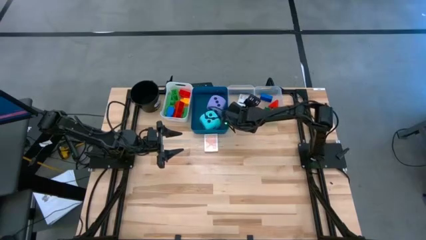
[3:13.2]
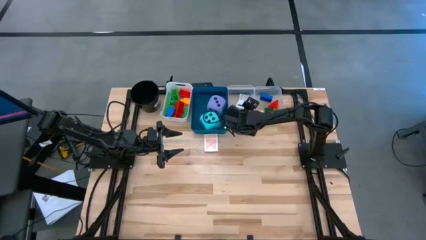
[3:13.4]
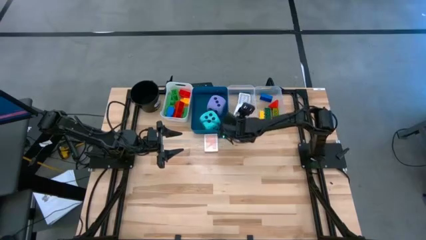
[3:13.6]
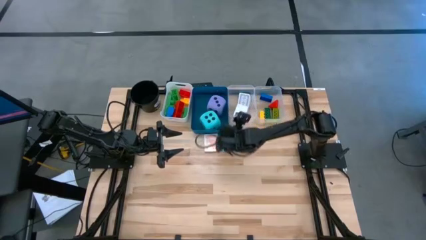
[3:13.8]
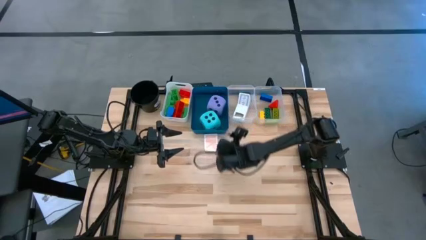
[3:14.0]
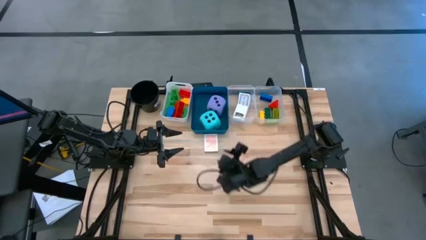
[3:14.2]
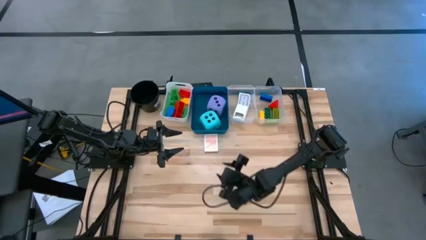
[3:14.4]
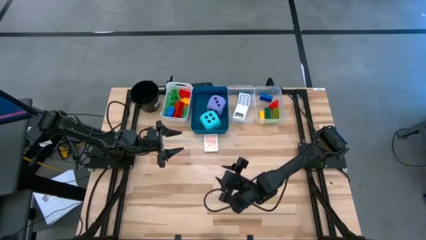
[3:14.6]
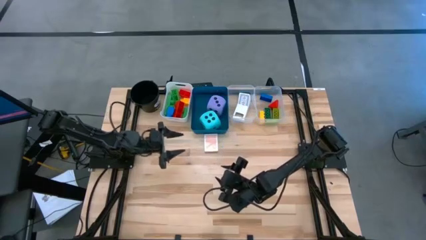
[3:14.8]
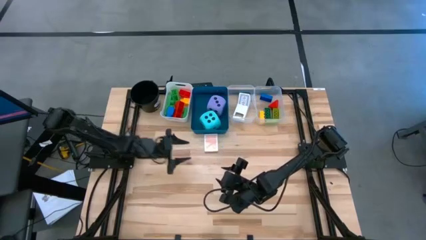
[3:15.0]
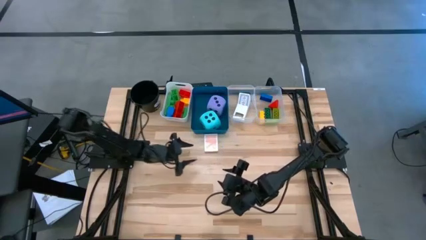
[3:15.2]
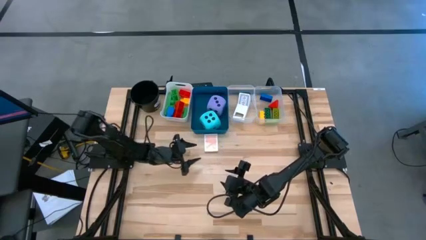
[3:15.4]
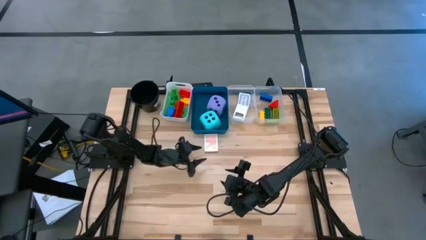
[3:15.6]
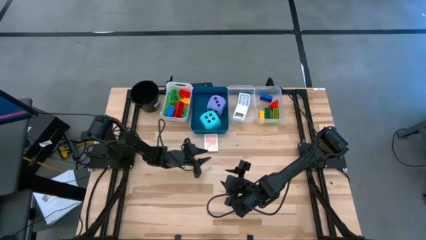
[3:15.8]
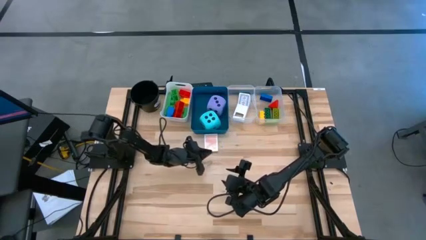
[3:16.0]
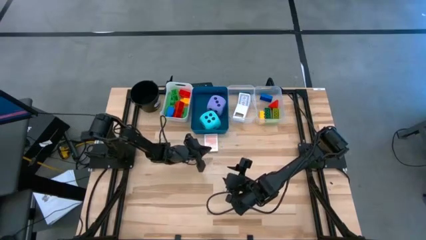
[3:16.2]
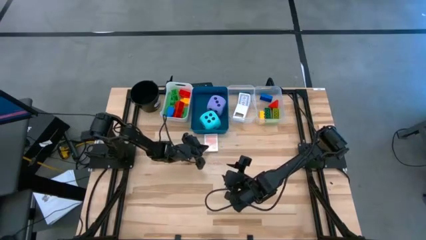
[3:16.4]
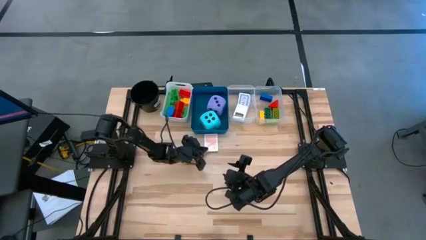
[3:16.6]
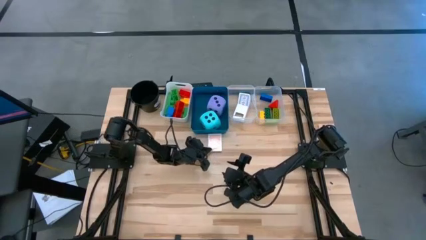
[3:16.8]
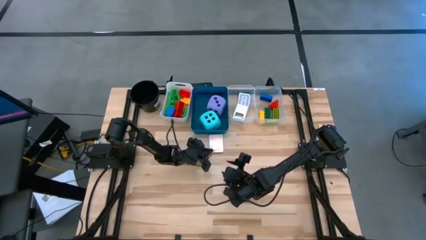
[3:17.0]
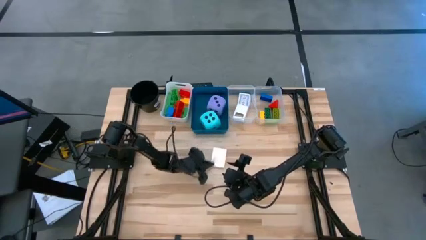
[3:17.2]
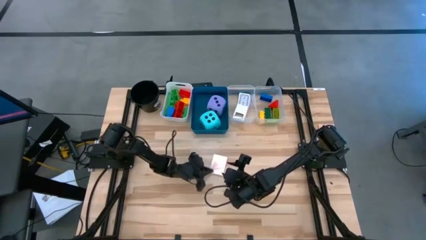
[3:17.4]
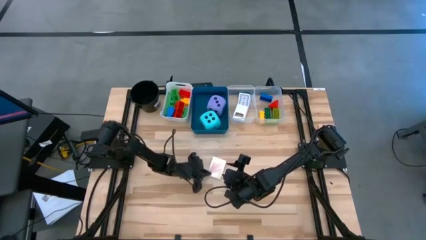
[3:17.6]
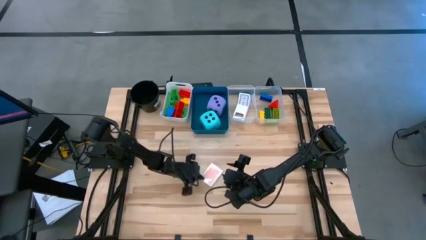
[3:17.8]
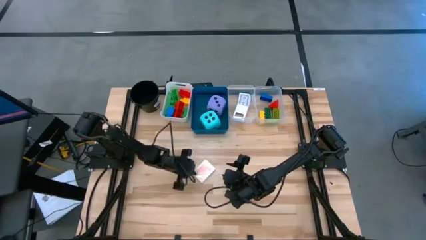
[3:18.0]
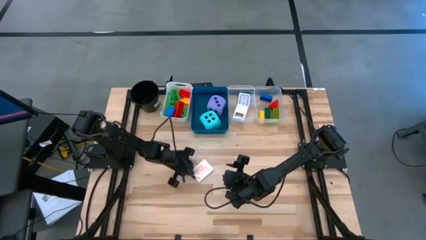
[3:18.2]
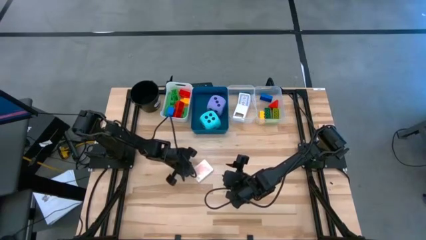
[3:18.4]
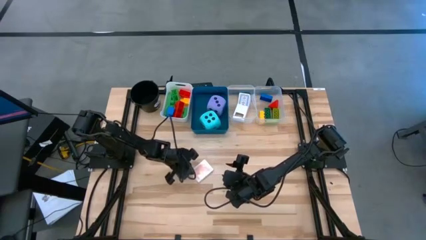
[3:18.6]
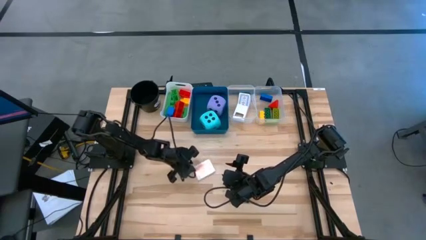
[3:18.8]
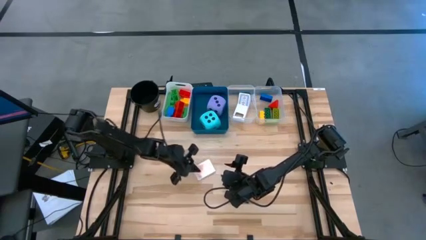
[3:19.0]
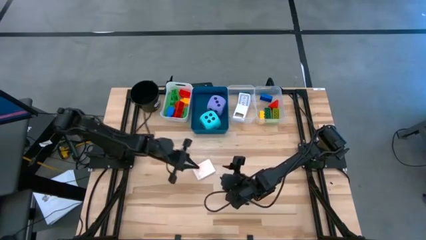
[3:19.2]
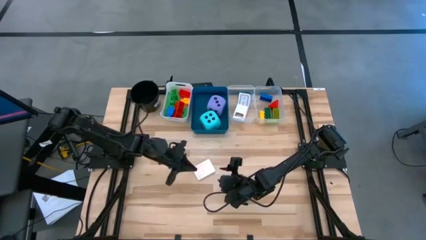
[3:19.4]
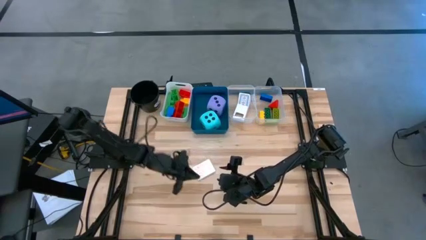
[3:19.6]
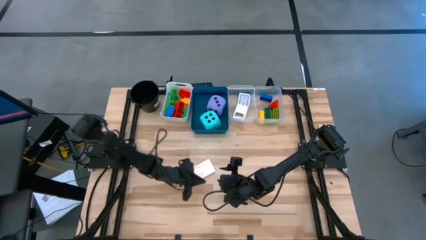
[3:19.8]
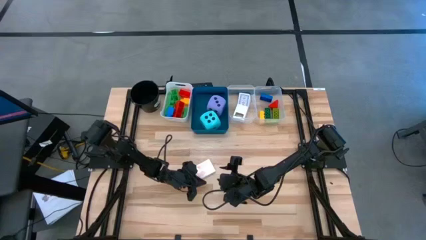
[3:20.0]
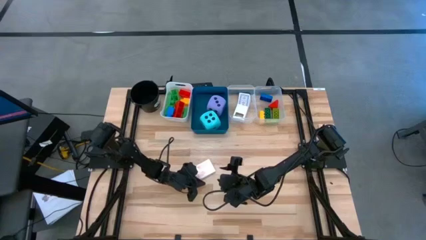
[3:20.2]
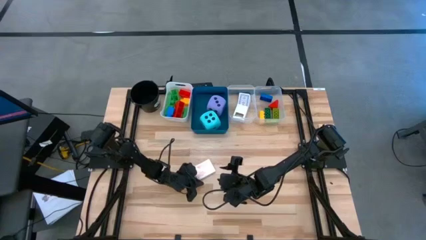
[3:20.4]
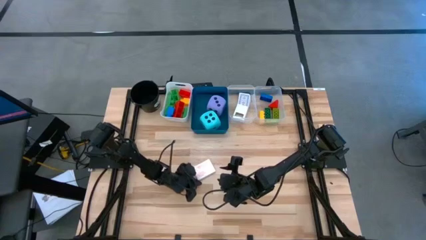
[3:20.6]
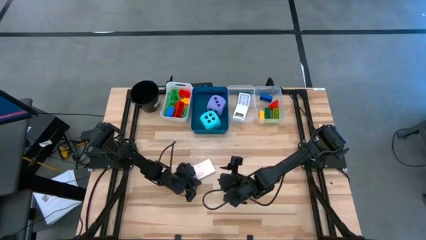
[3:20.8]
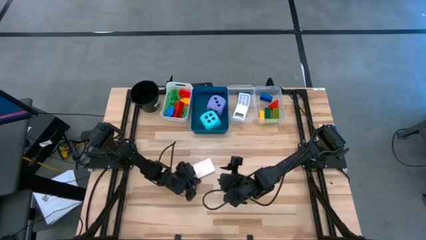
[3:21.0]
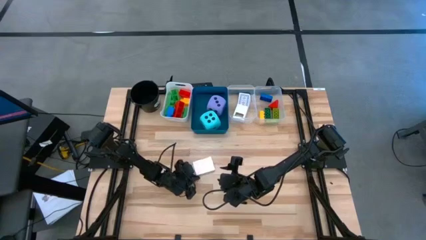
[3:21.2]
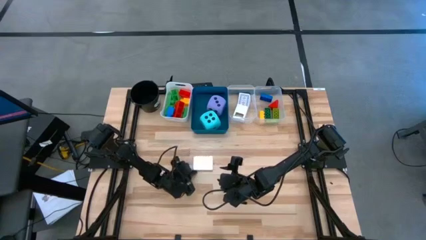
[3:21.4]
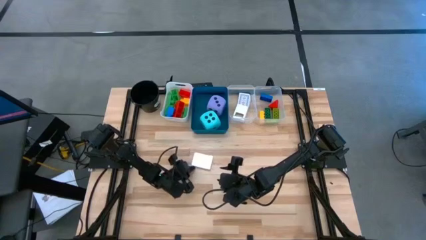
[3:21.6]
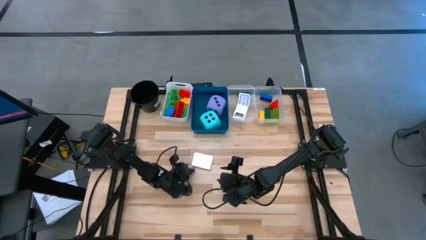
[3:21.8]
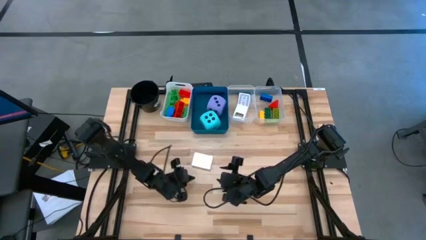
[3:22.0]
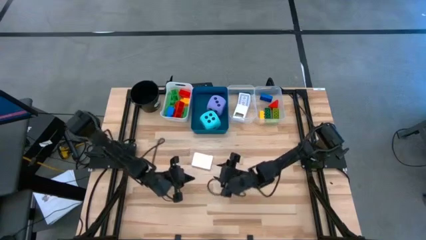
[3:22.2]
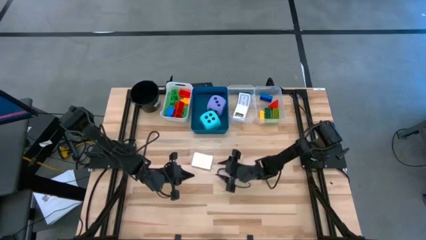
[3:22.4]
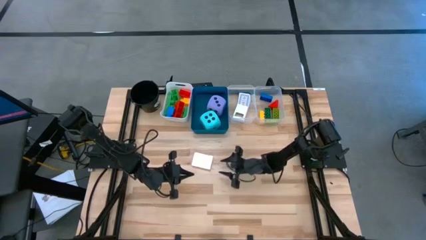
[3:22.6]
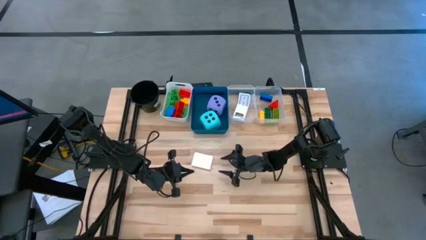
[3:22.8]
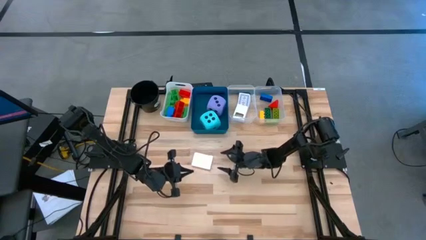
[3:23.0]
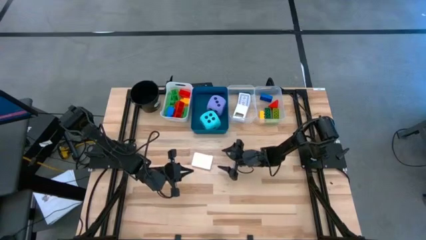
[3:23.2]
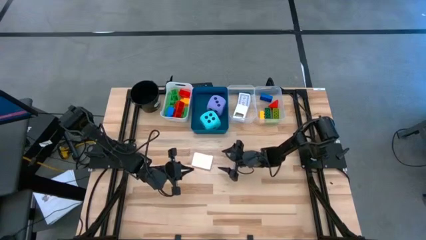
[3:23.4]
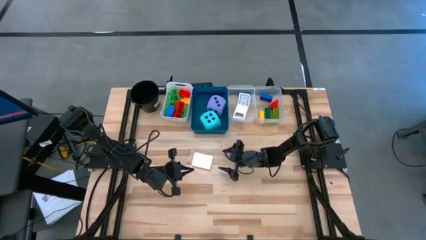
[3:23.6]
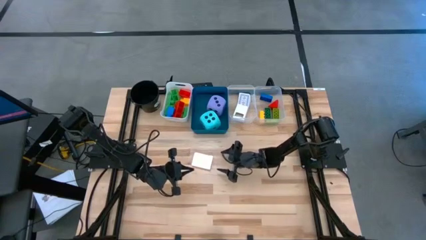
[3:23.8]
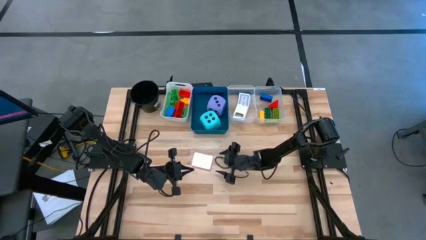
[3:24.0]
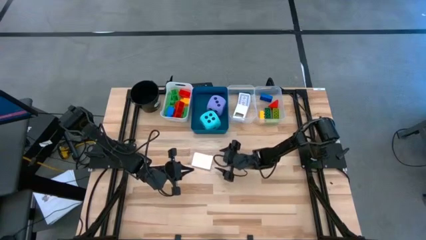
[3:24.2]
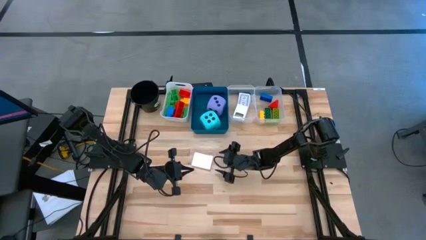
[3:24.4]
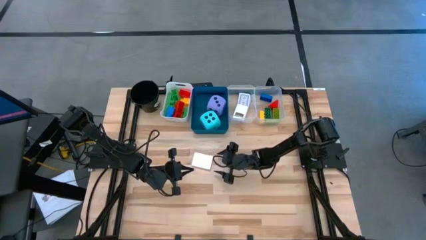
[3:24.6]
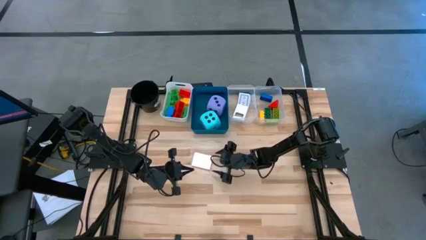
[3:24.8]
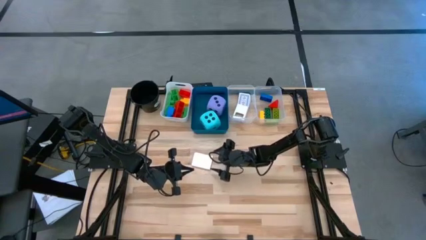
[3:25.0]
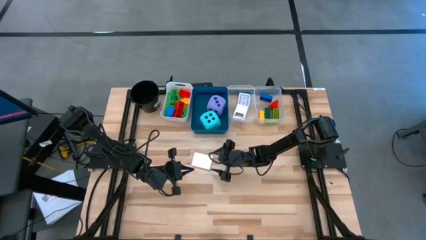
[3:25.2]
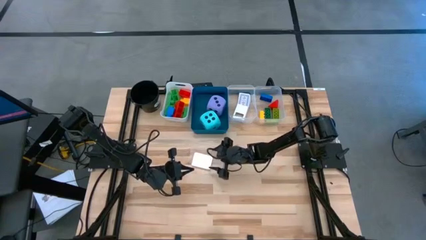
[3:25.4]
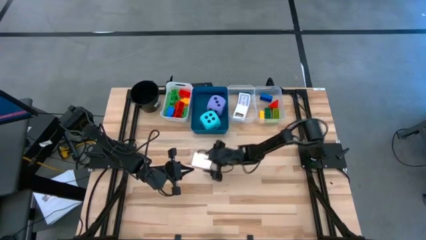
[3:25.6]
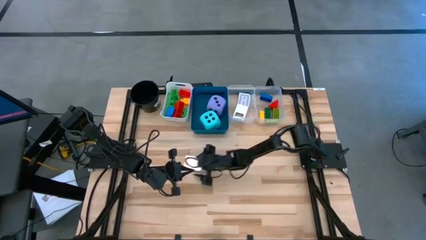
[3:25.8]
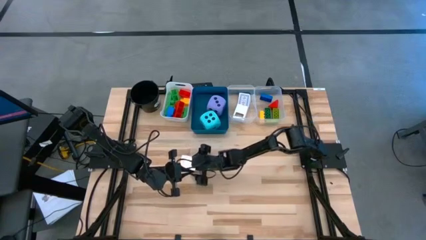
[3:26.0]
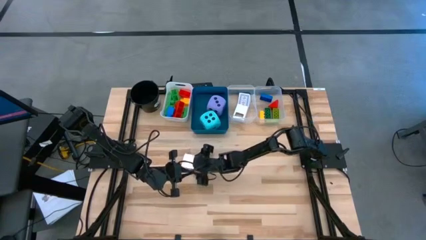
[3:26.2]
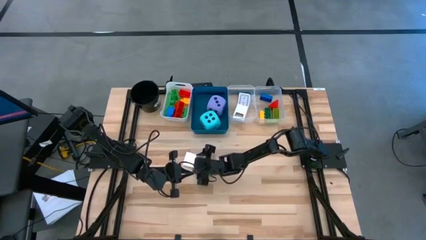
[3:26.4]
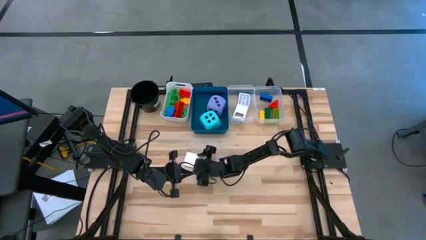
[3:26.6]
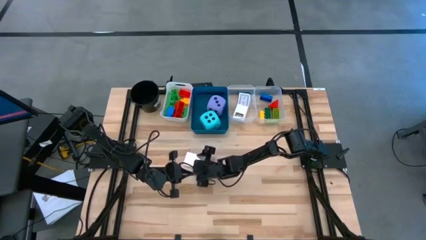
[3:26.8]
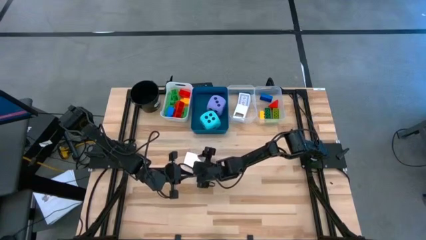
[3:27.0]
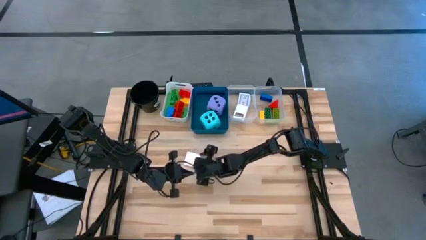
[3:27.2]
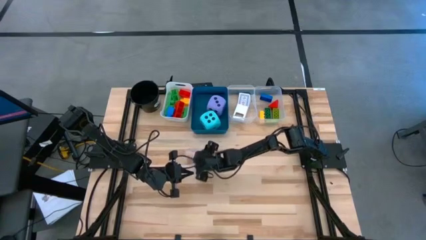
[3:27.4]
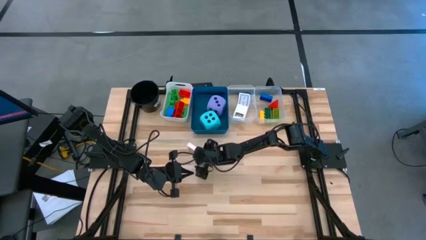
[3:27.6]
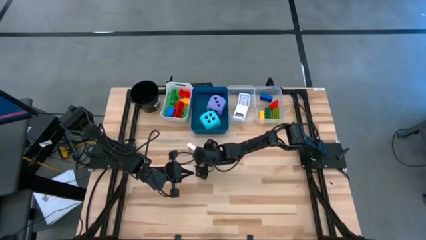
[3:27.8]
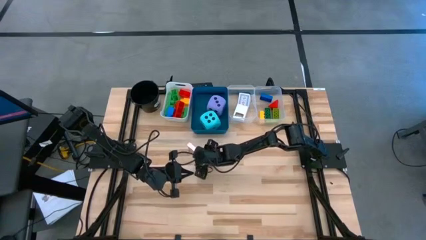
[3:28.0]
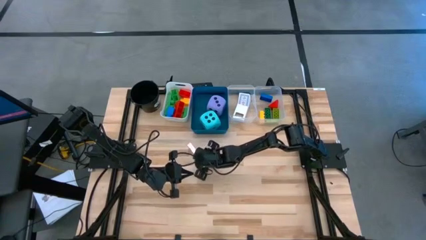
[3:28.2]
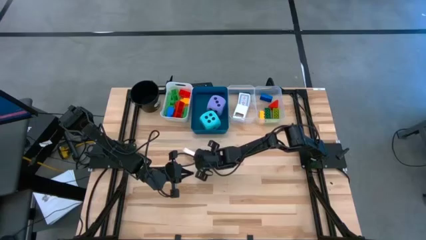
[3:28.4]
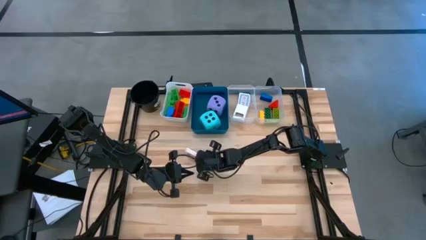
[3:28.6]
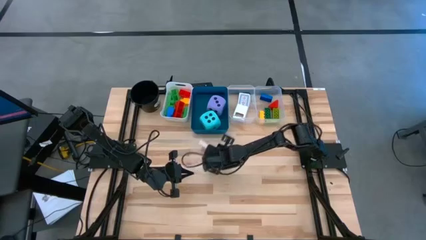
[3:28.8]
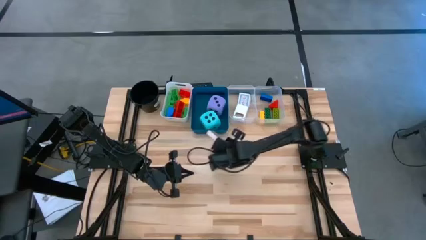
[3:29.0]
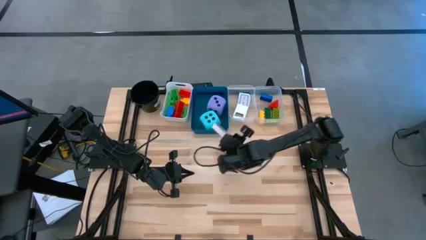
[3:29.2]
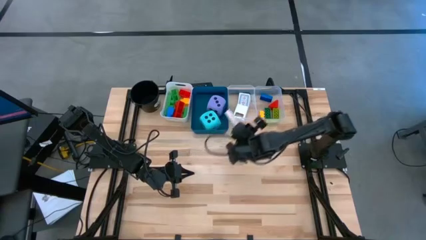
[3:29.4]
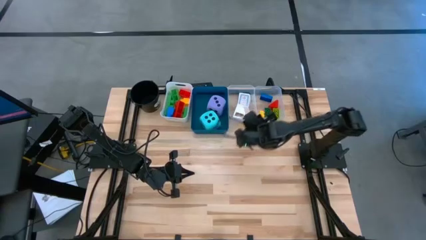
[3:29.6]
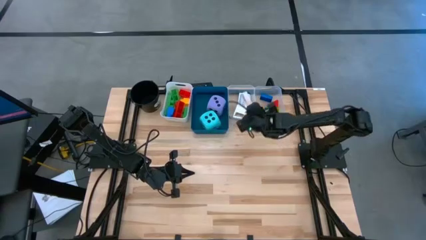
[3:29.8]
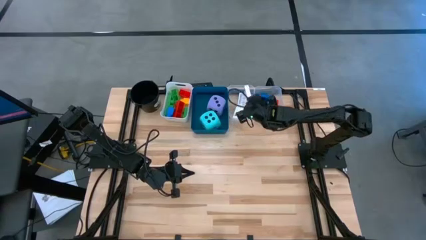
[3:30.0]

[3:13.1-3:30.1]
Task: Pick & Place Toys
Put the orange deck of cards into the left transparent bin
